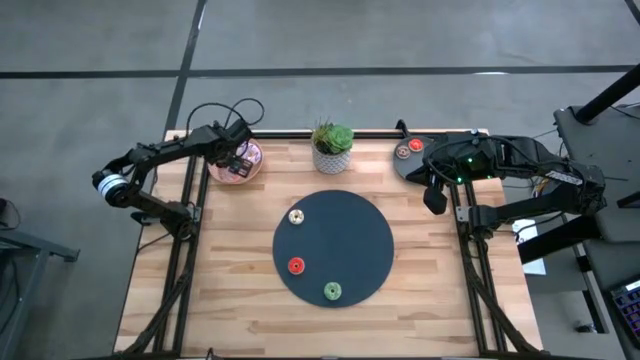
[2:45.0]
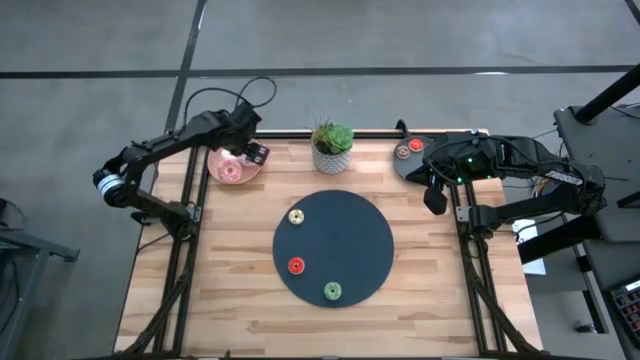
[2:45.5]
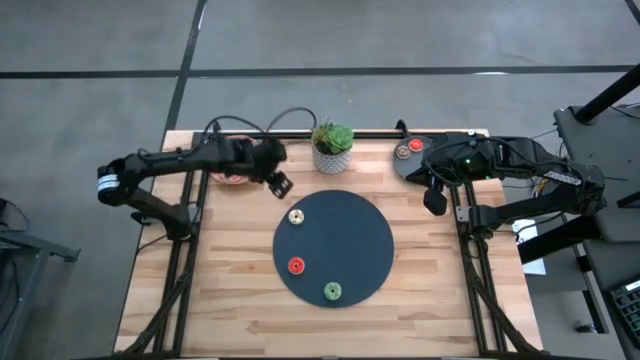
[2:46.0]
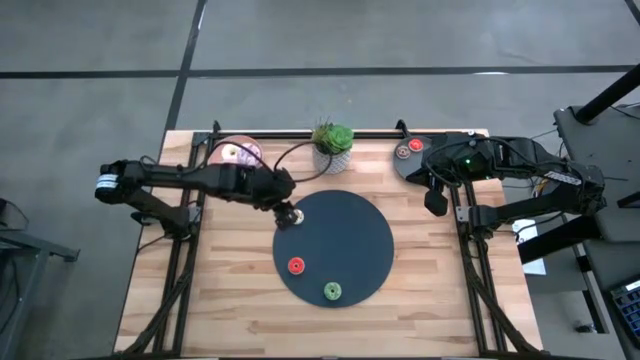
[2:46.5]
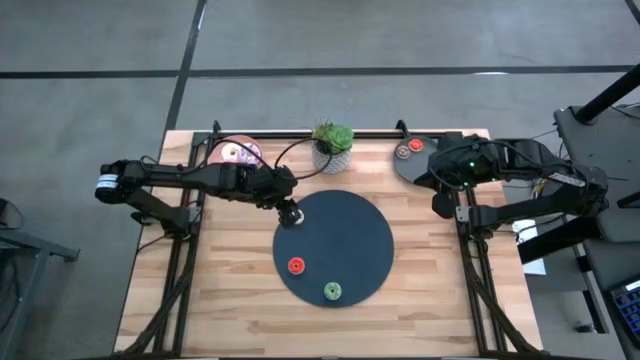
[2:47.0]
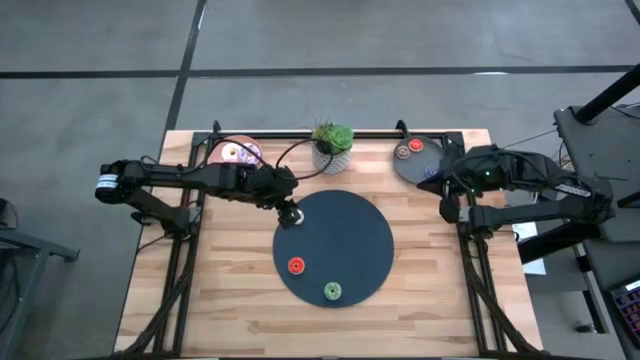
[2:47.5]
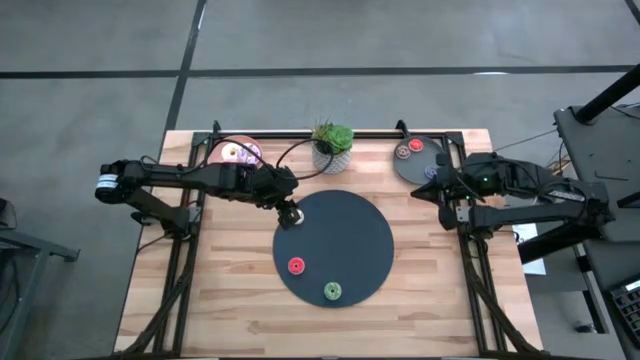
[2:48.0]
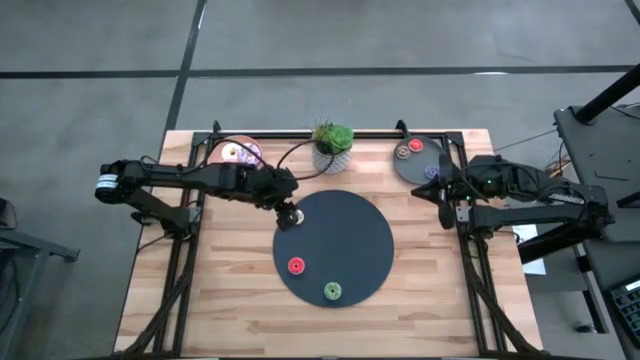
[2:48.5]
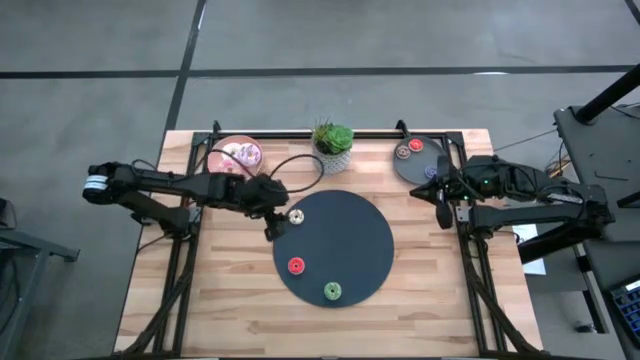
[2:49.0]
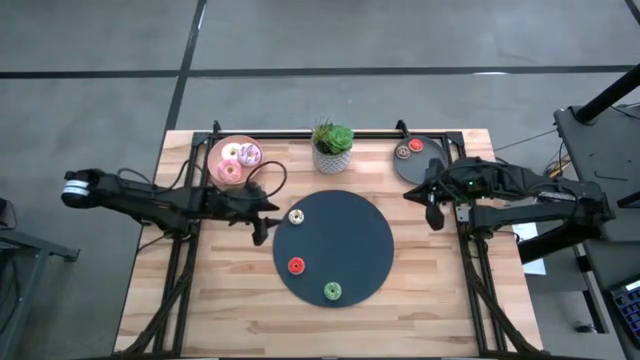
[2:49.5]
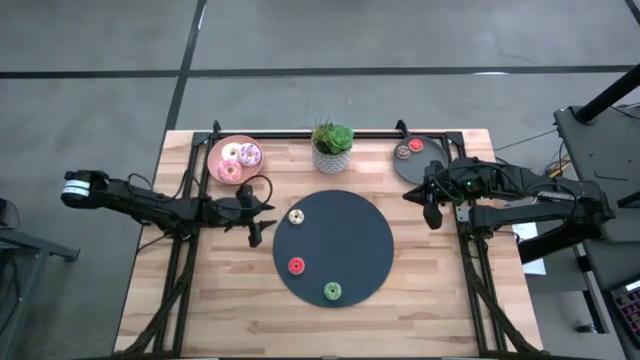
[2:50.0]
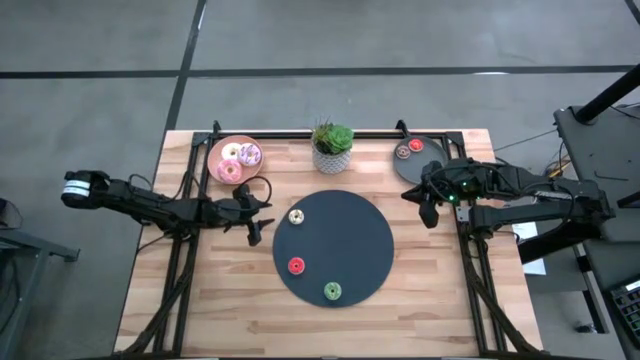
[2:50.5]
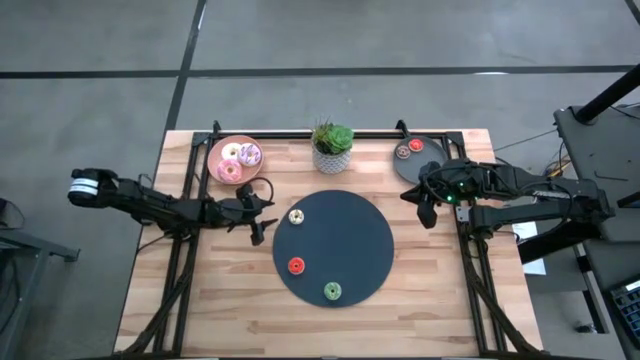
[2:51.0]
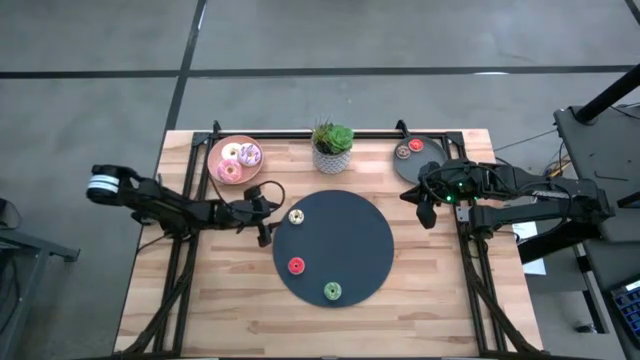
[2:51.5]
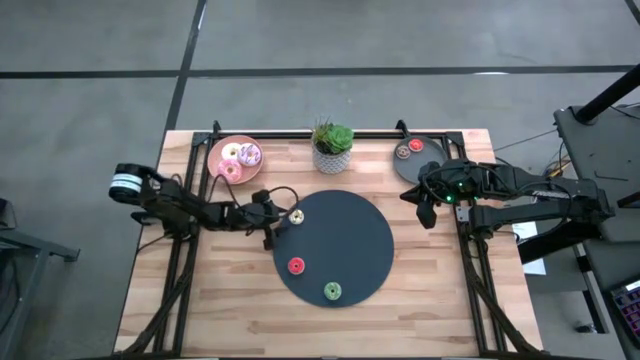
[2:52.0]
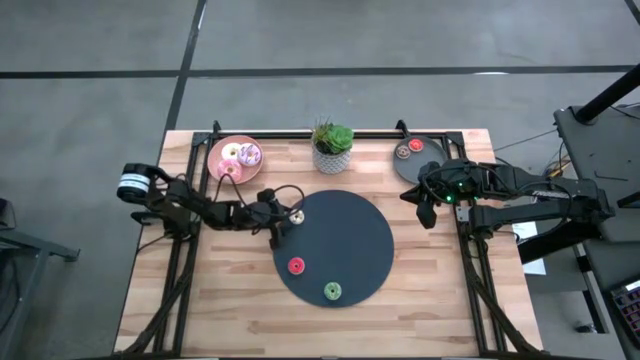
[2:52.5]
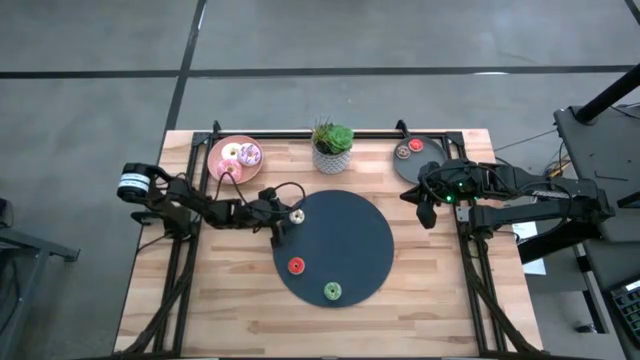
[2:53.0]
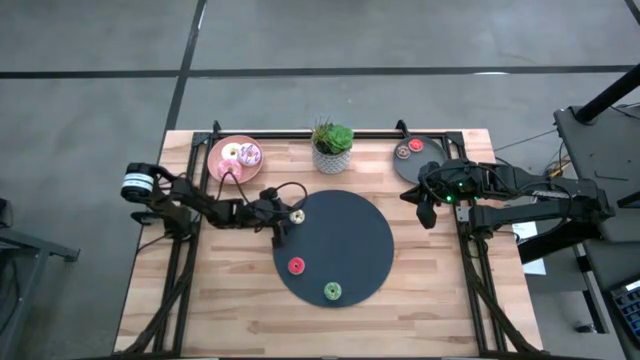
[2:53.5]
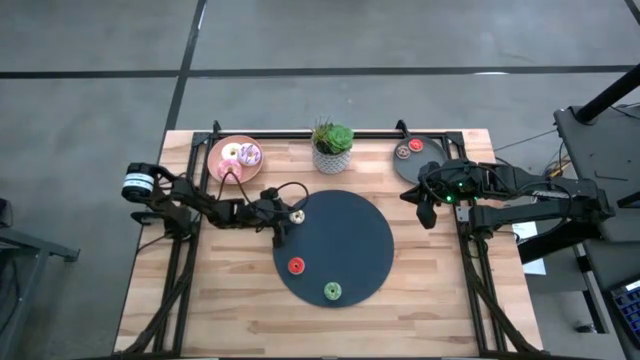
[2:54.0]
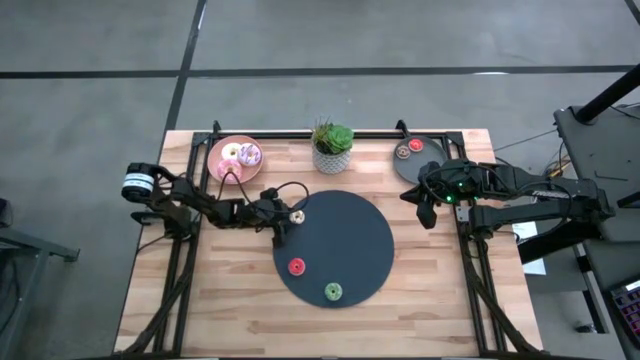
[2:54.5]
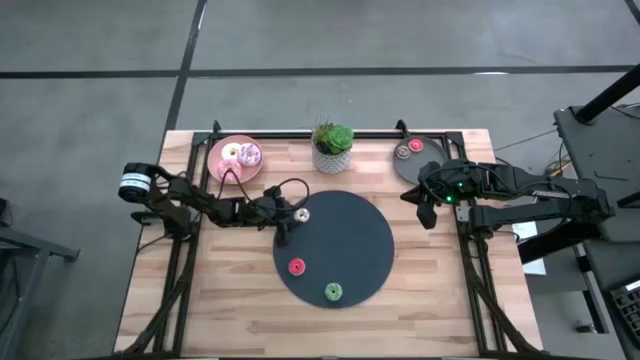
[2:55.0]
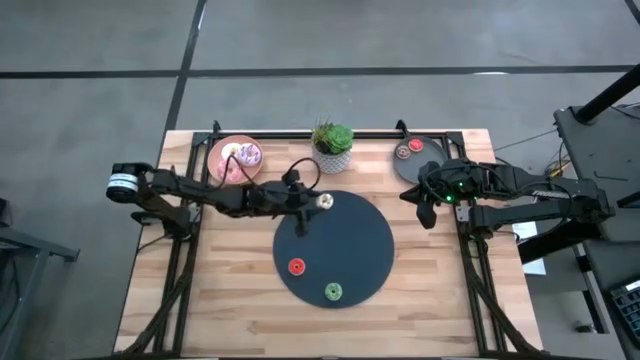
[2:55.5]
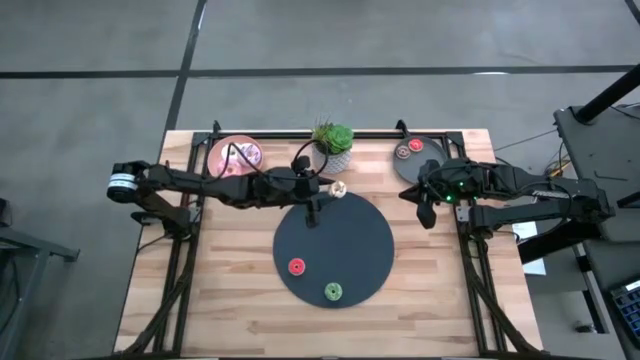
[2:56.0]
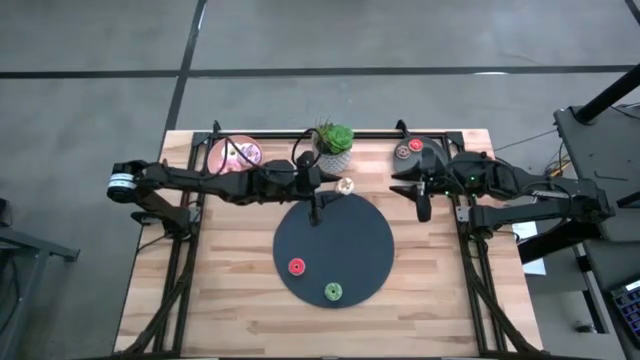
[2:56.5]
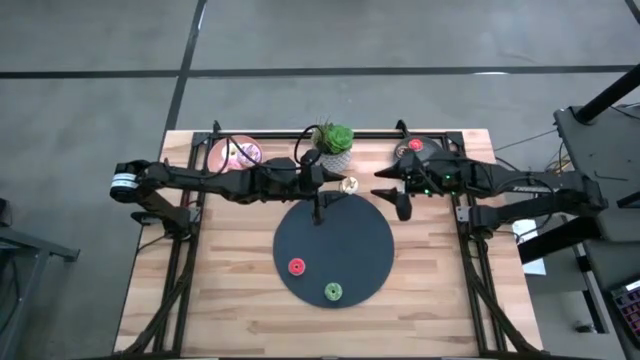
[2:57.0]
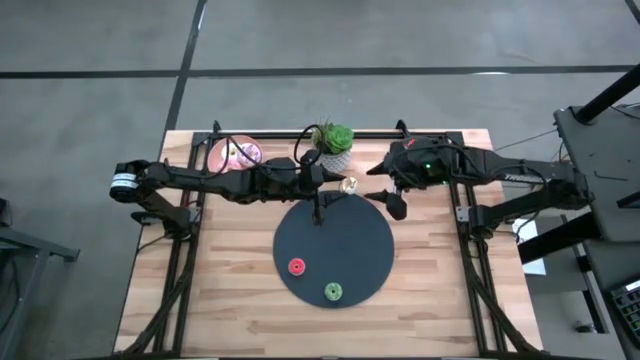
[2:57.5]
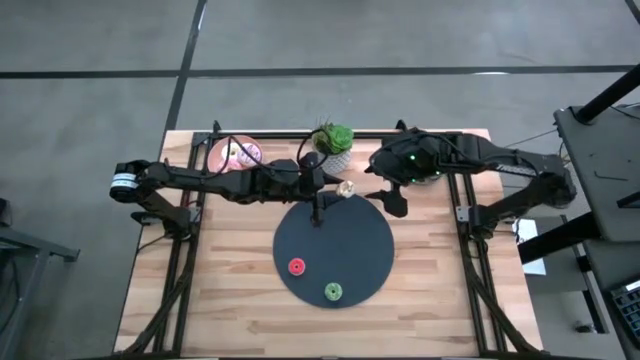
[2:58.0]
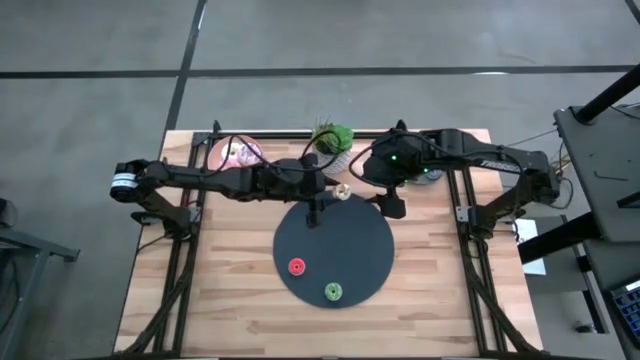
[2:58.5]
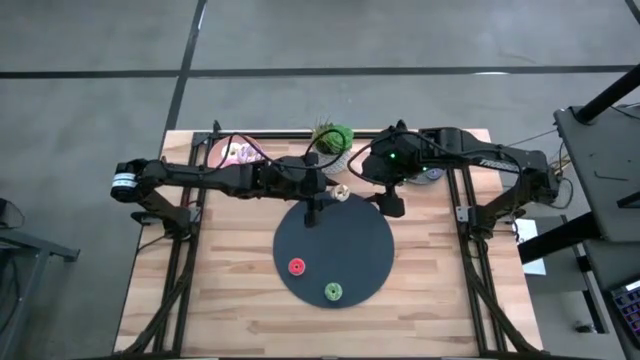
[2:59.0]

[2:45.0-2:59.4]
Task: Pick & Place donuts
Put the small white donut on the gray plate

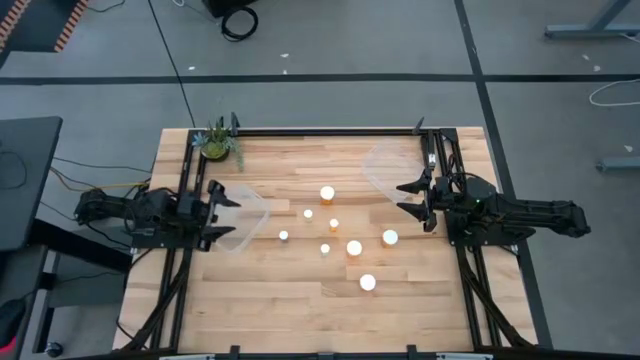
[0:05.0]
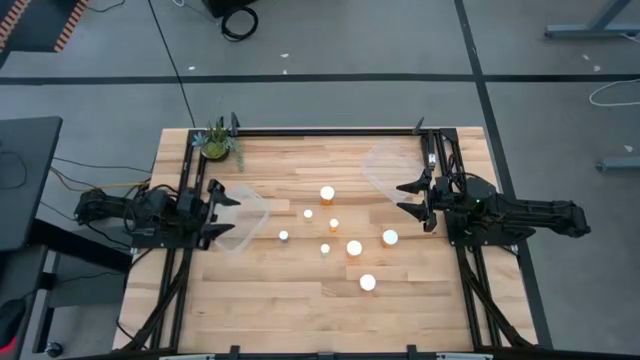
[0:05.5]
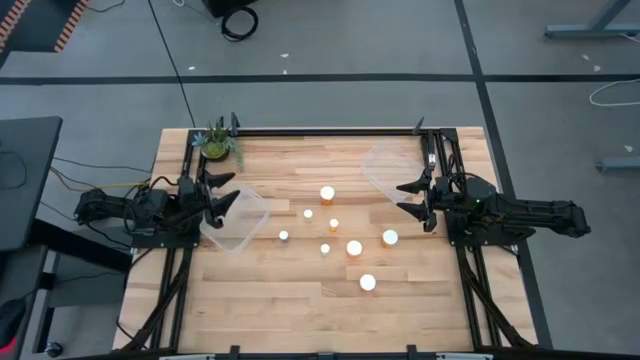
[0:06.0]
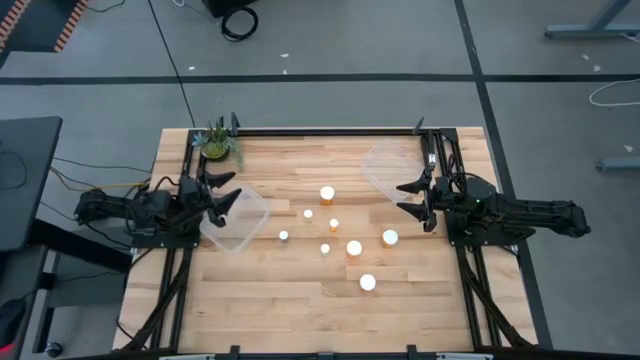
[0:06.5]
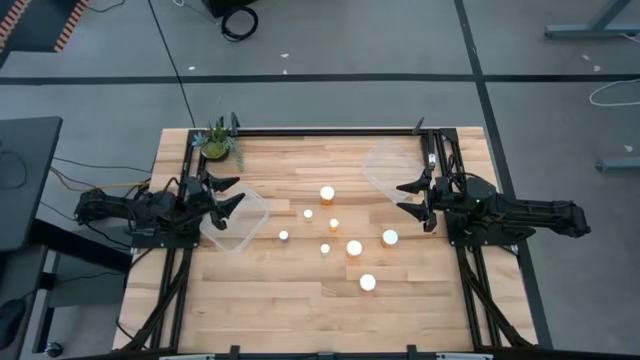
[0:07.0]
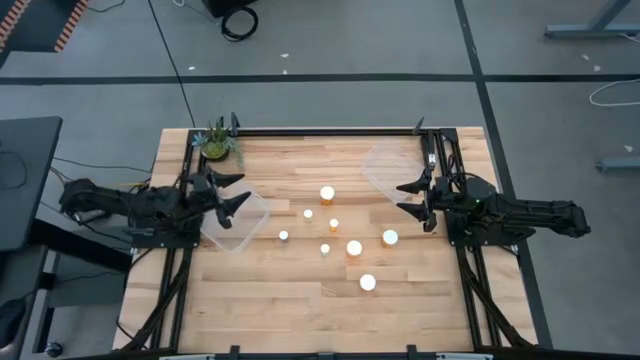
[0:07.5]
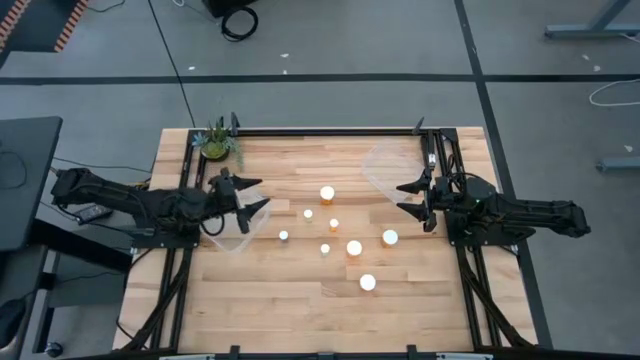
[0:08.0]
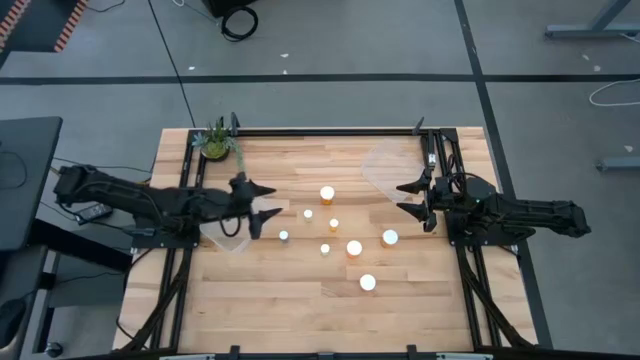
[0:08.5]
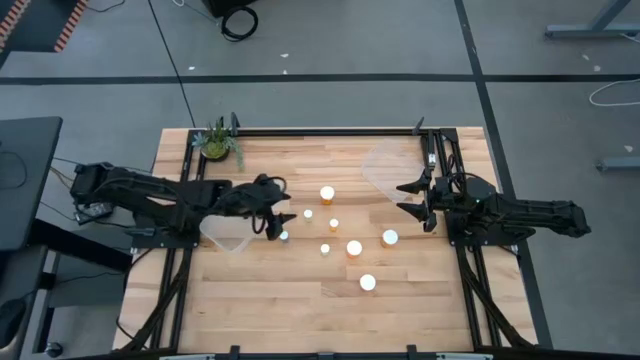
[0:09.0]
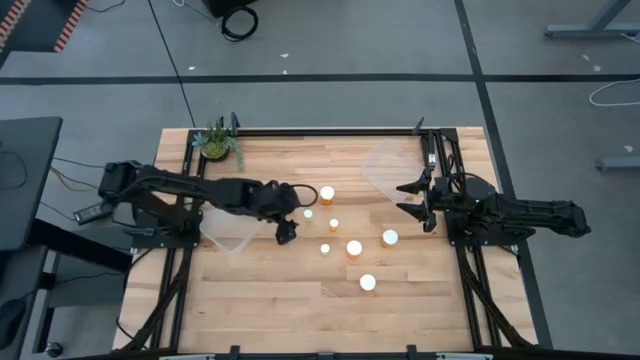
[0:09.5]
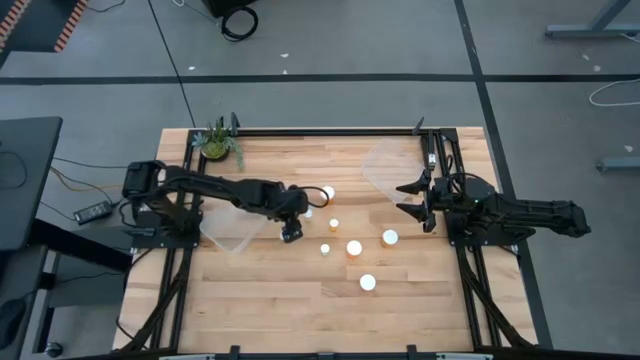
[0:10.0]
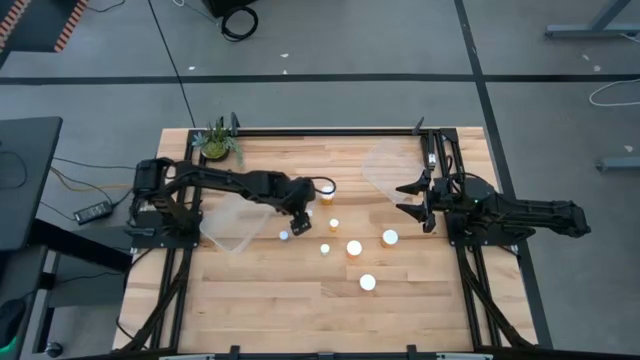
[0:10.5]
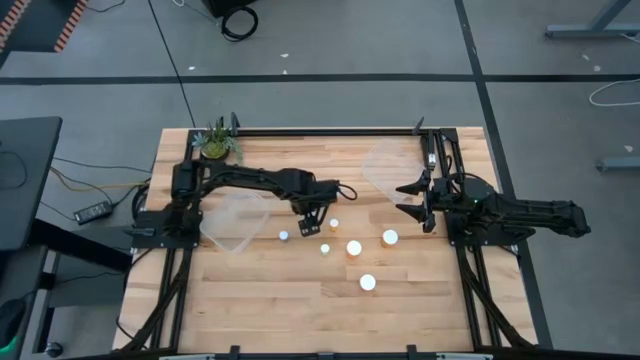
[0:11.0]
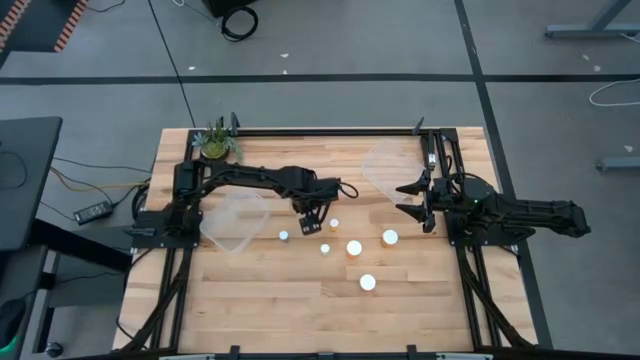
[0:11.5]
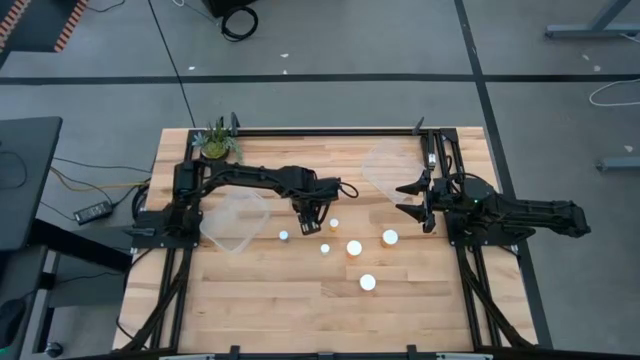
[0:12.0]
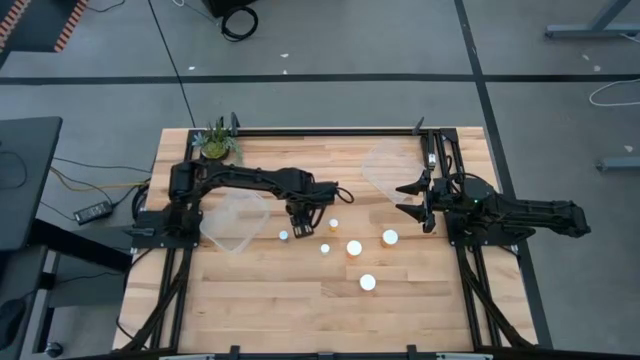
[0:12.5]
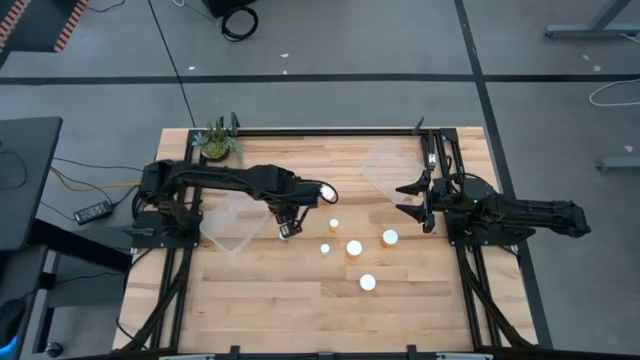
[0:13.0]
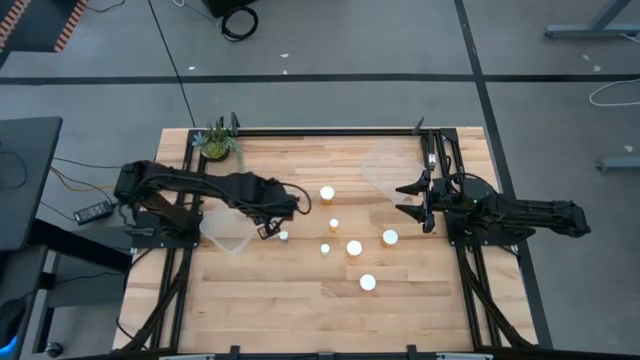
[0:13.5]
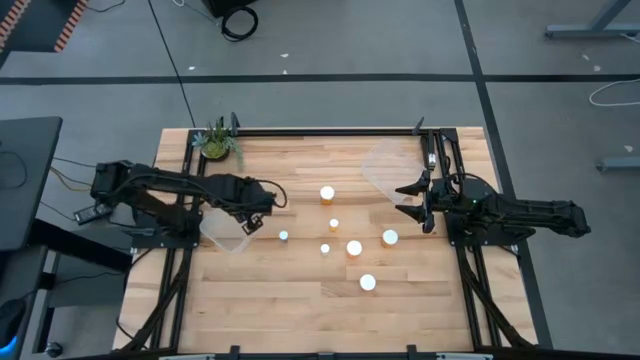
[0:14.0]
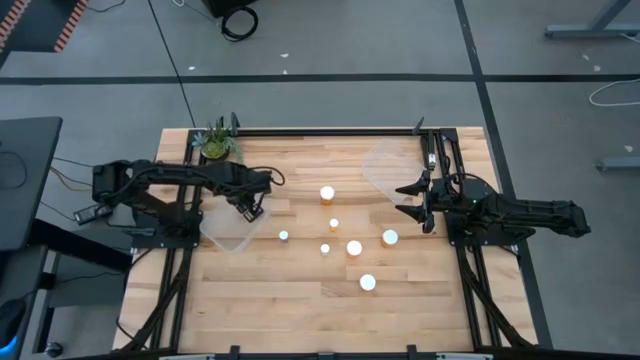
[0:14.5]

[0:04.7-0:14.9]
Task: Pick and place medicine bottles into bin by pill shape (circle, oval)
Put the small yellow pill bottle into the left transparent bin
